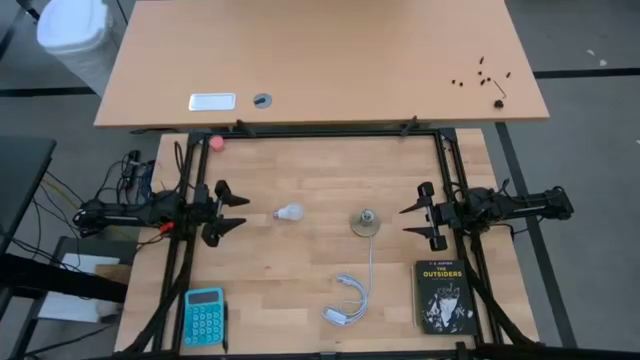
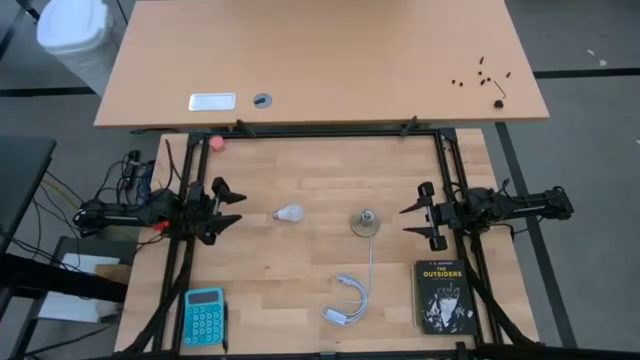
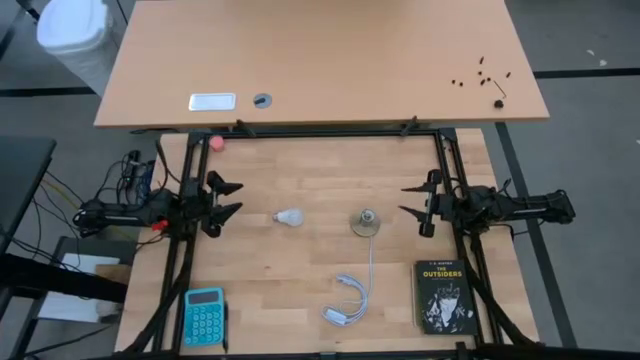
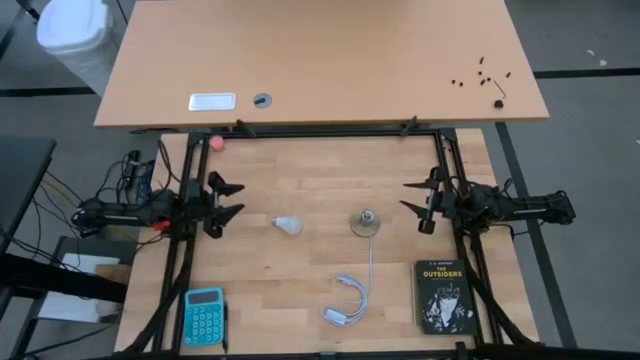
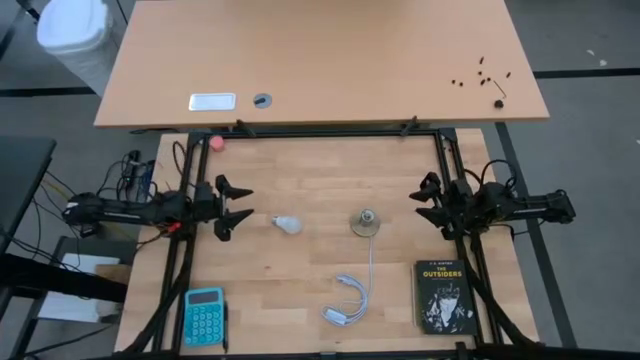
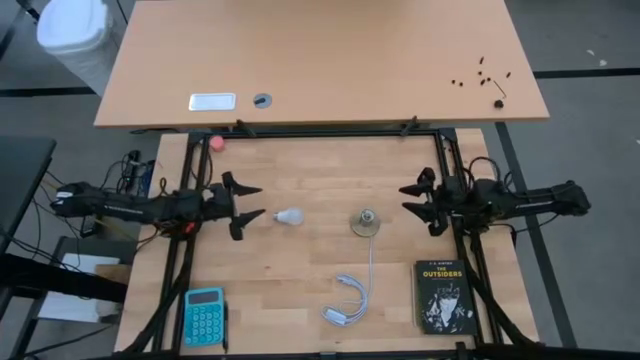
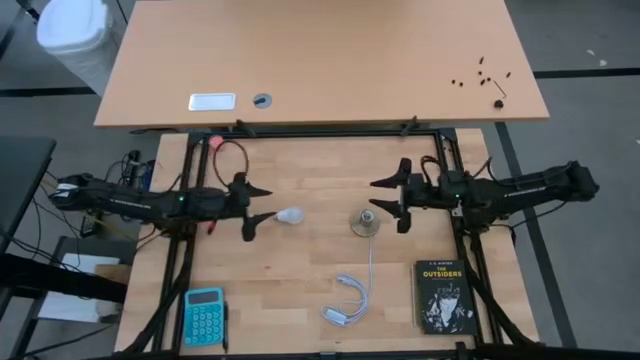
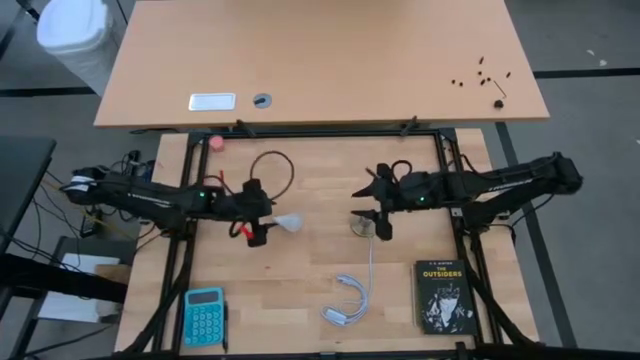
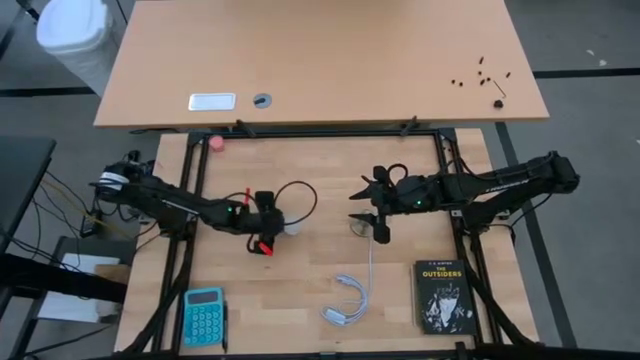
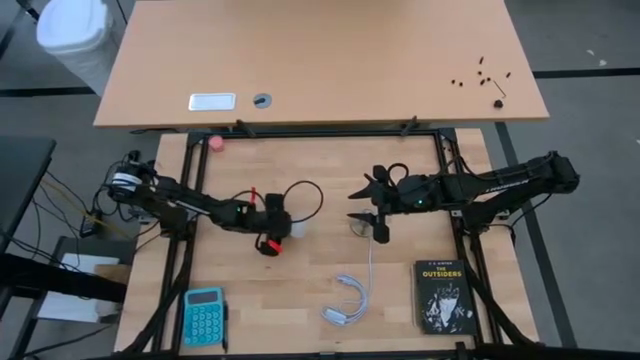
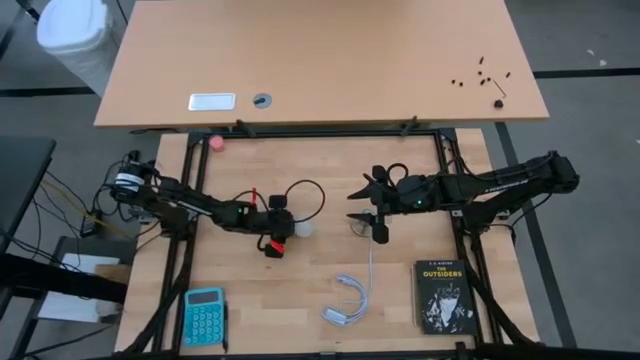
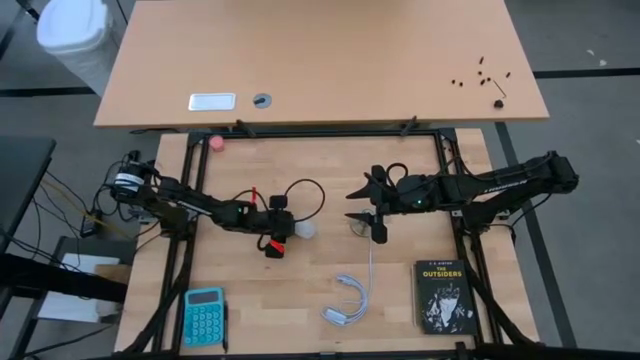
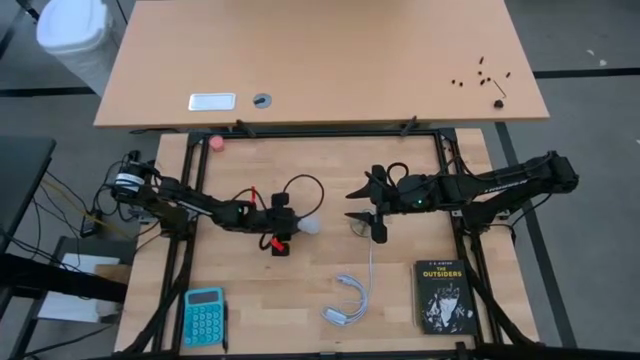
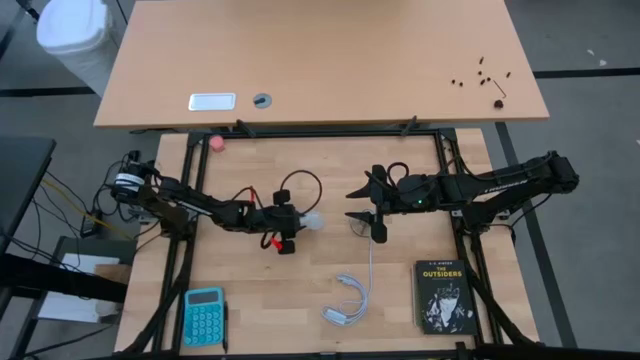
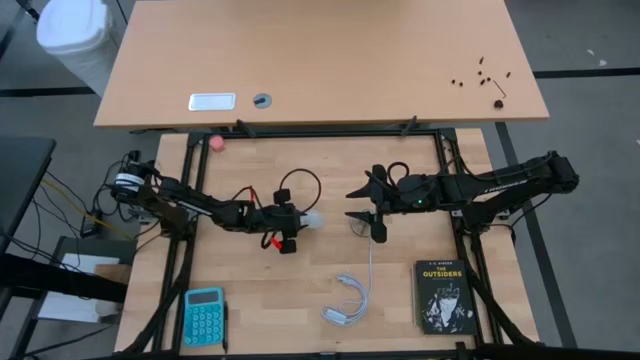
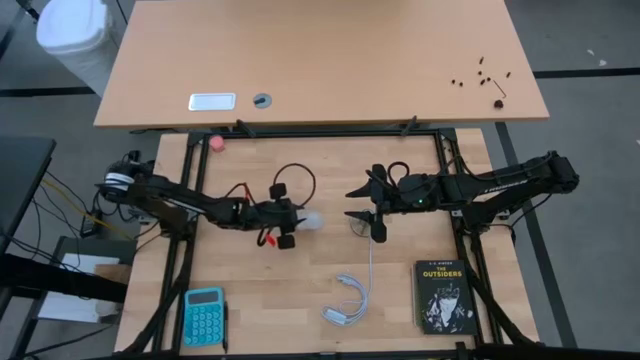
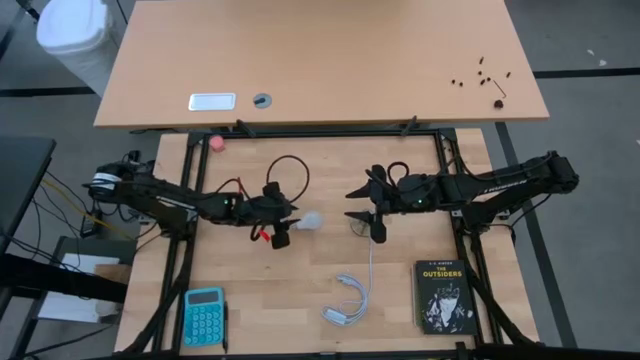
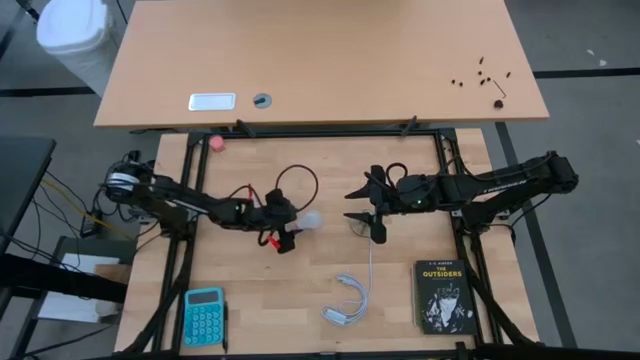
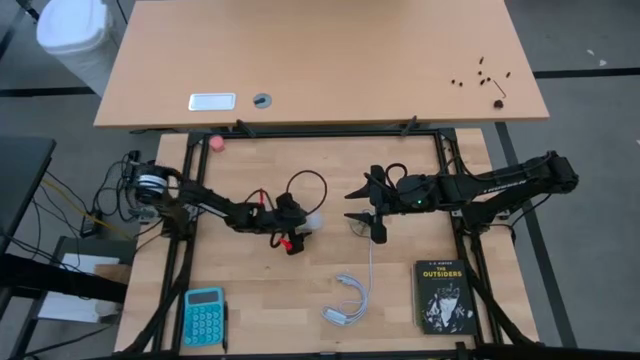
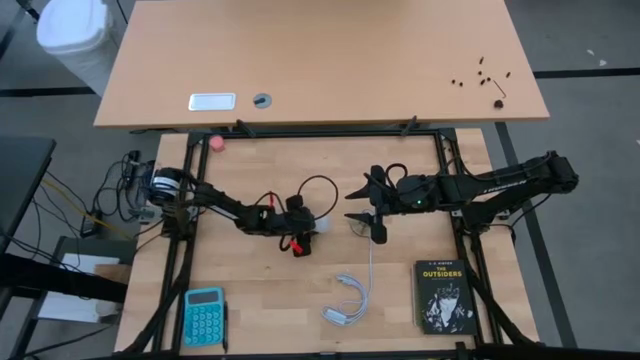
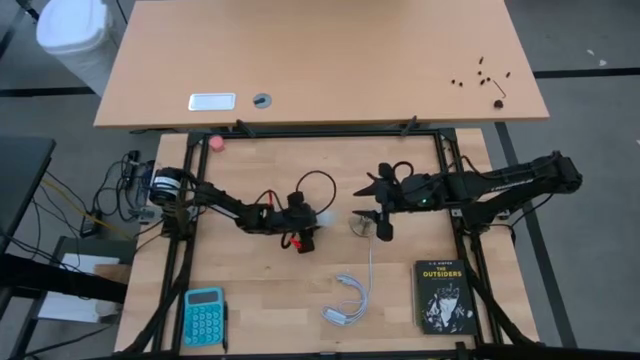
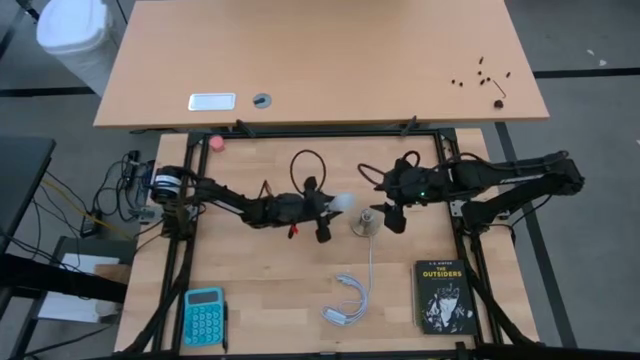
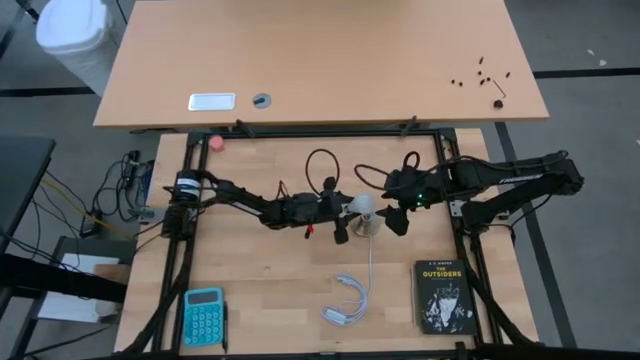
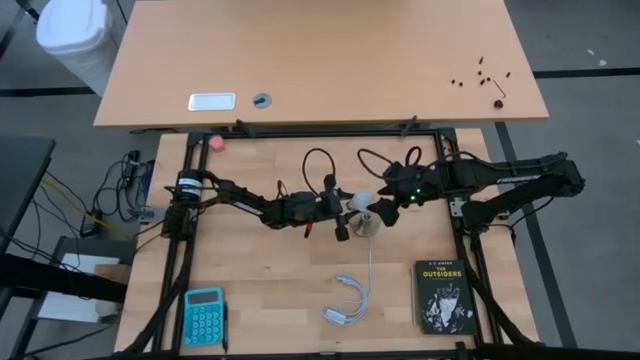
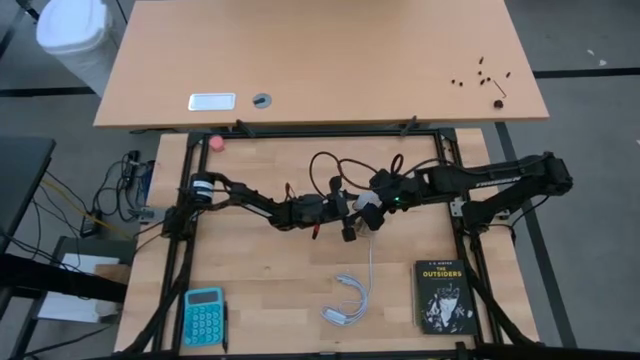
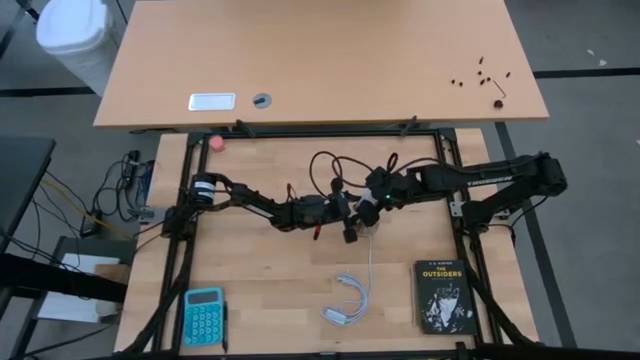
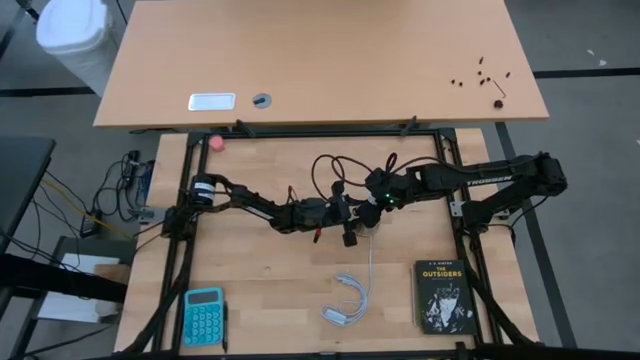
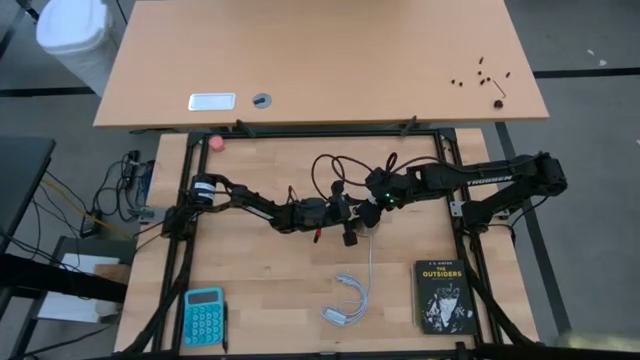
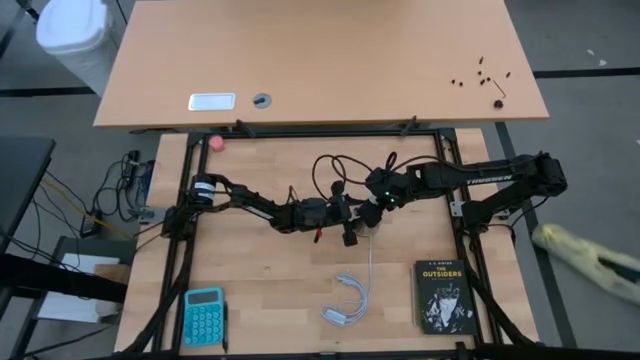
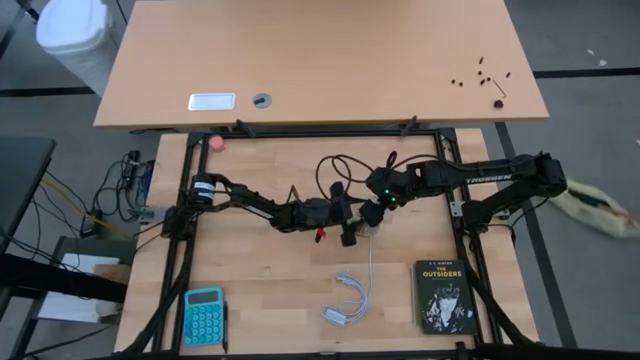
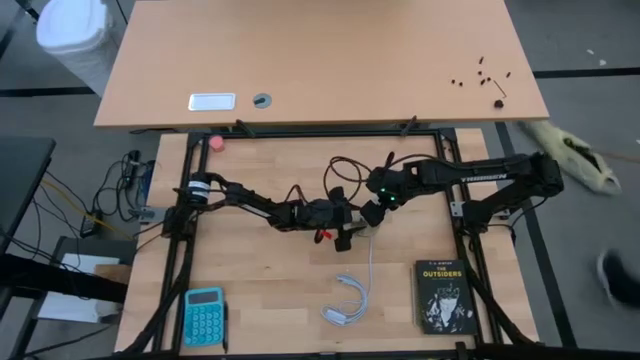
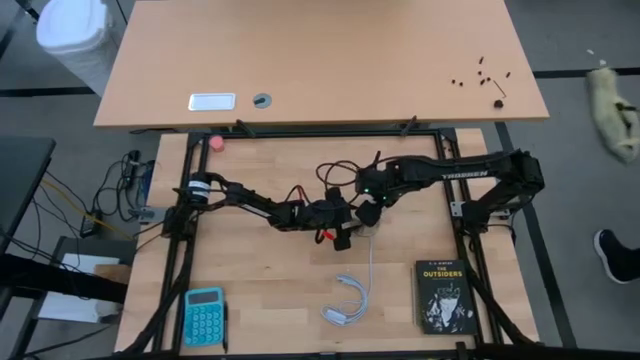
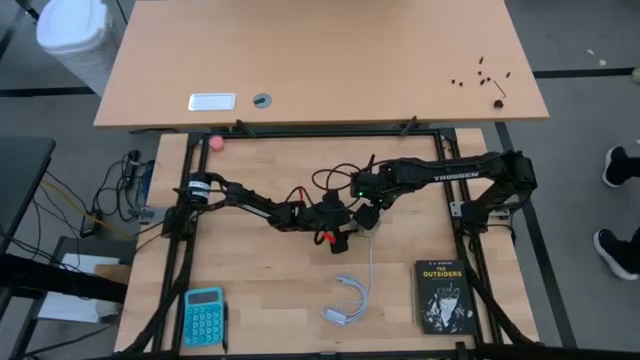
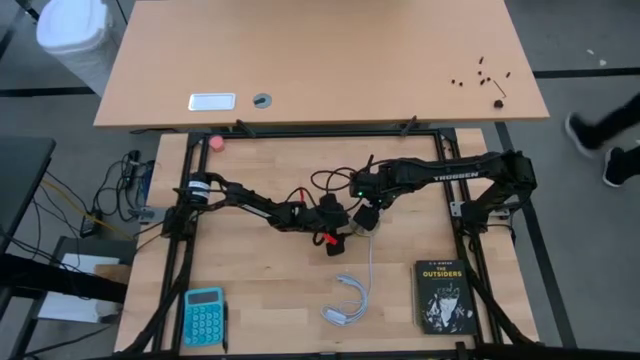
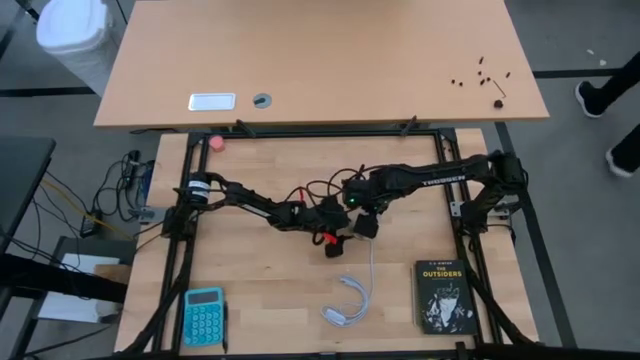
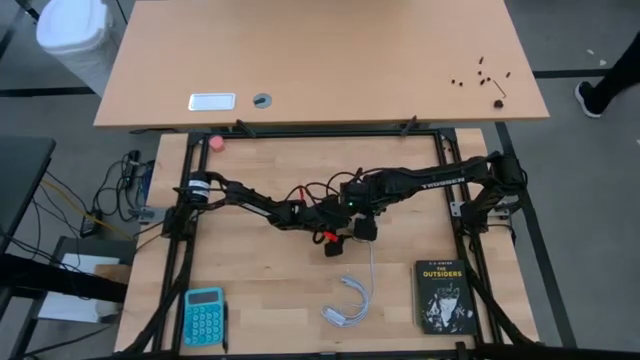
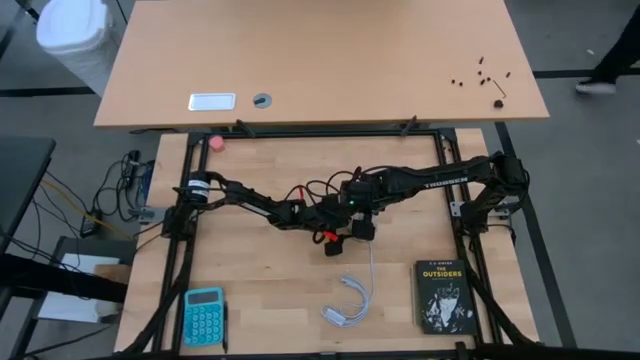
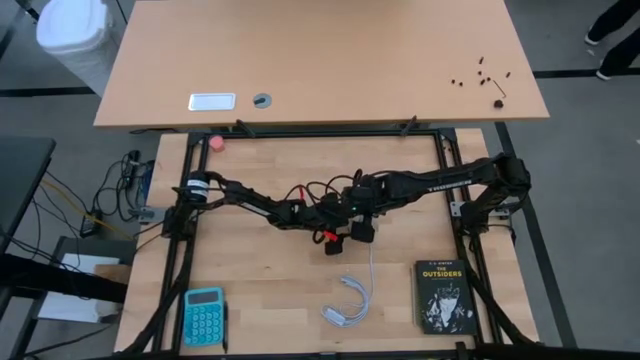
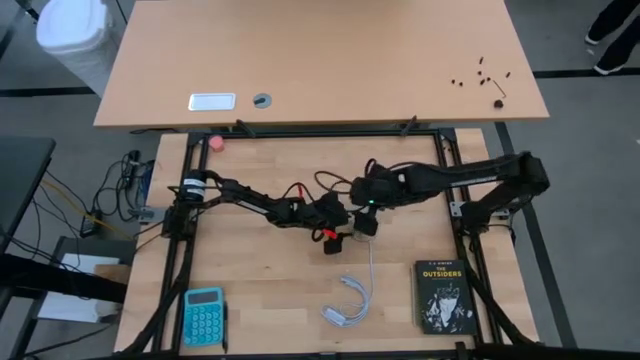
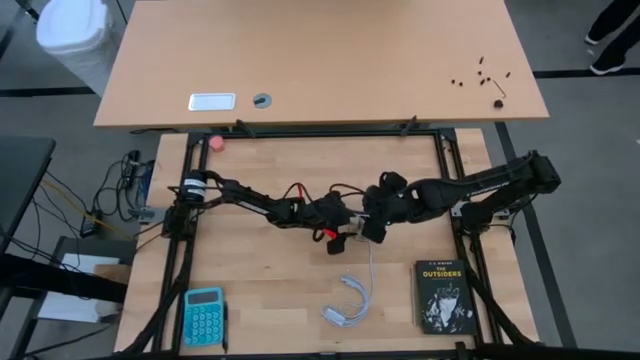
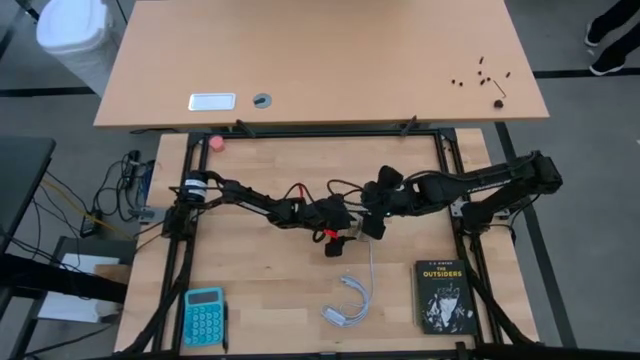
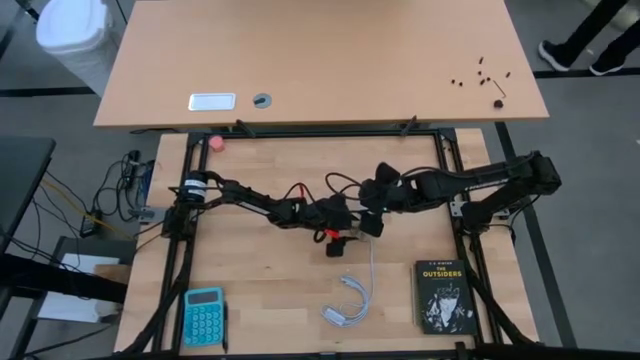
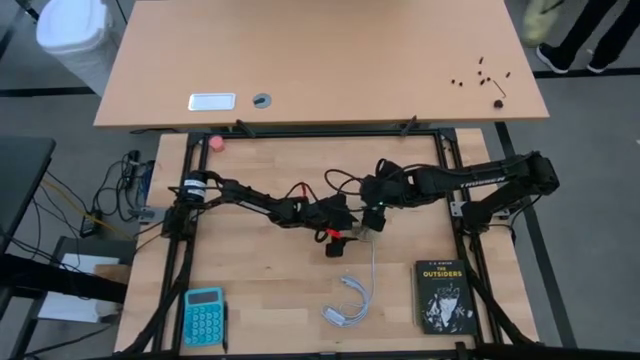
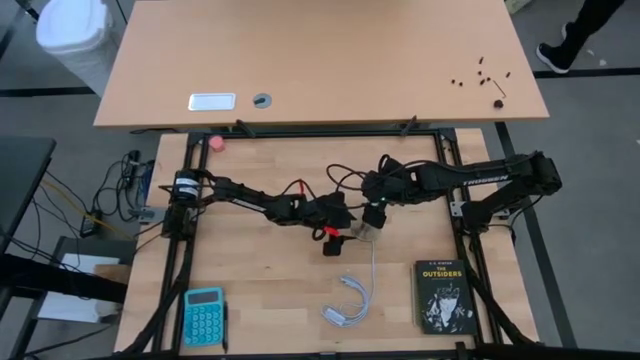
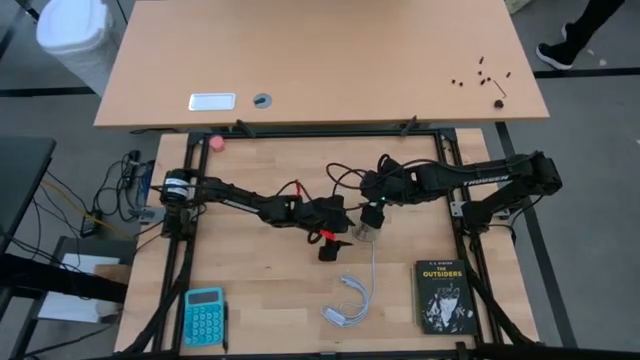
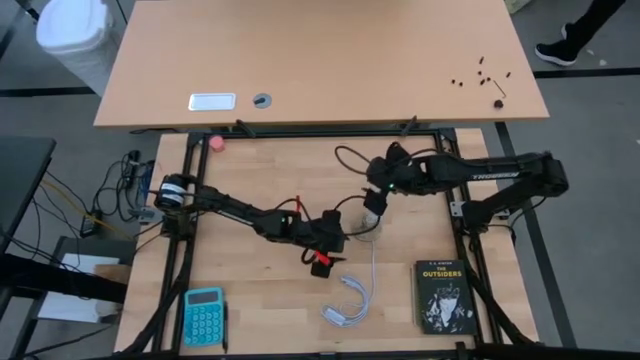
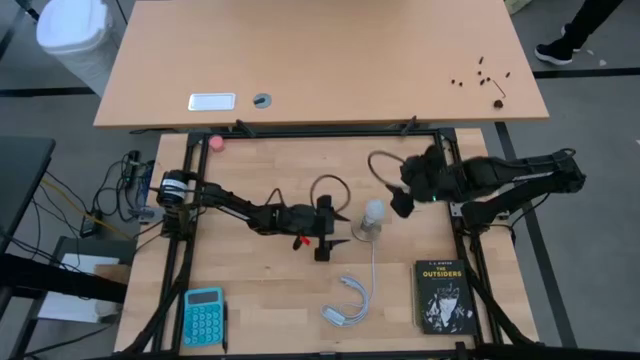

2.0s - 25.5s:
Task: Screw lightbulb
Insert the white lightbulb into the silver lamp
